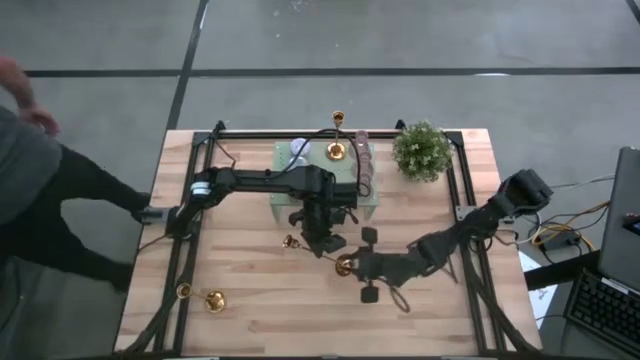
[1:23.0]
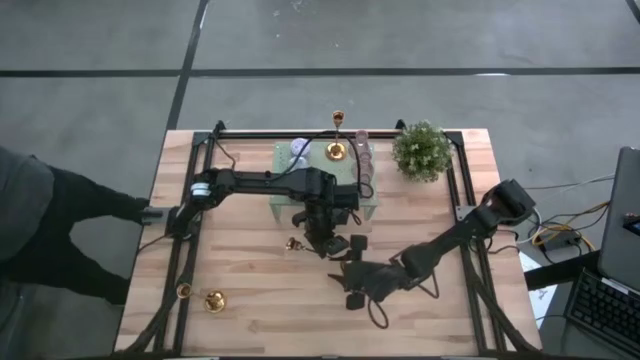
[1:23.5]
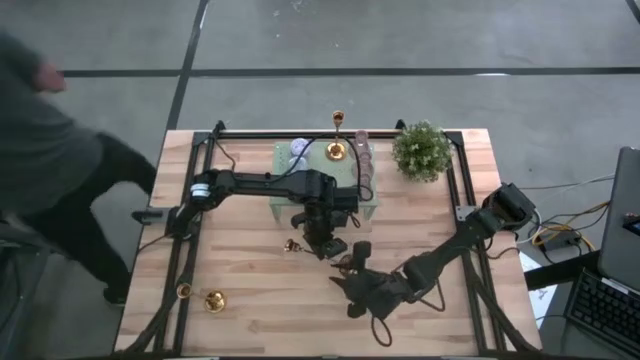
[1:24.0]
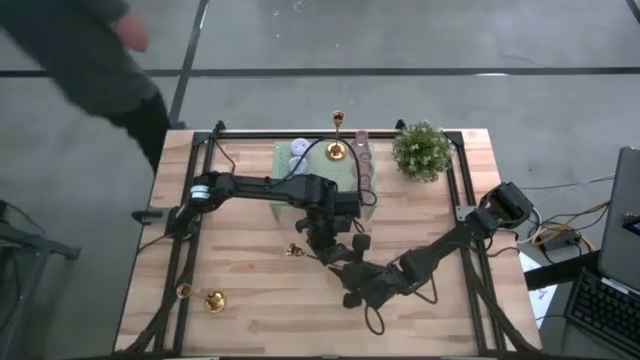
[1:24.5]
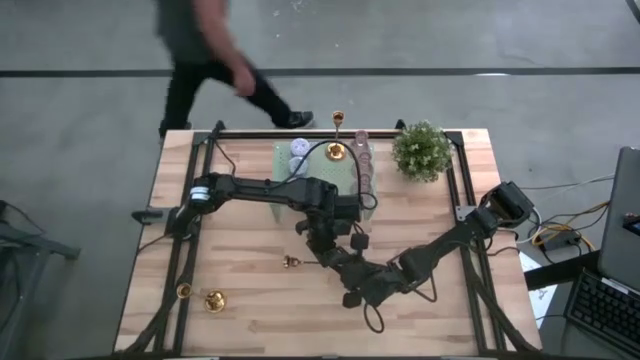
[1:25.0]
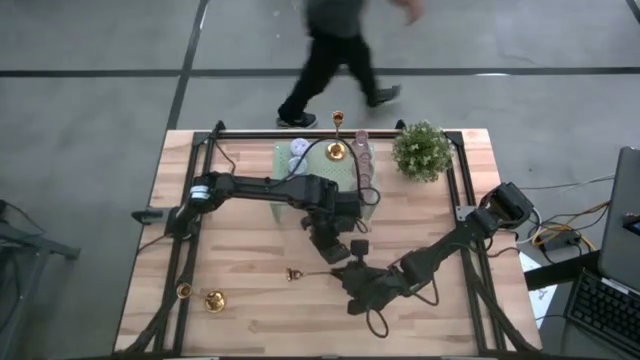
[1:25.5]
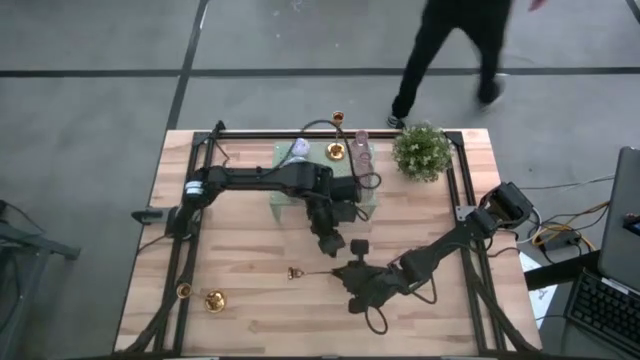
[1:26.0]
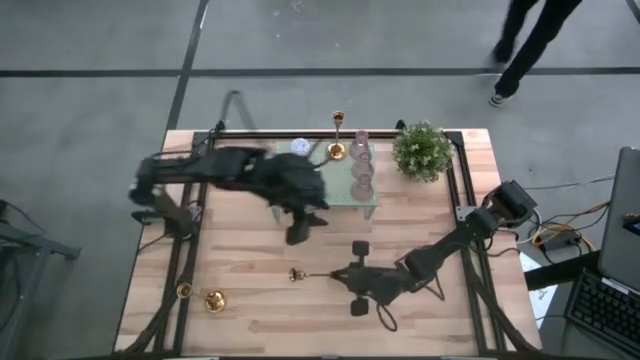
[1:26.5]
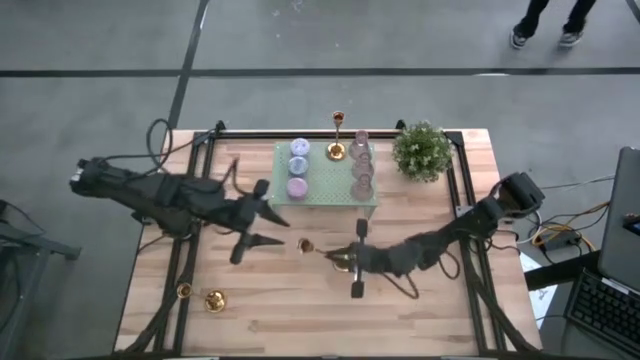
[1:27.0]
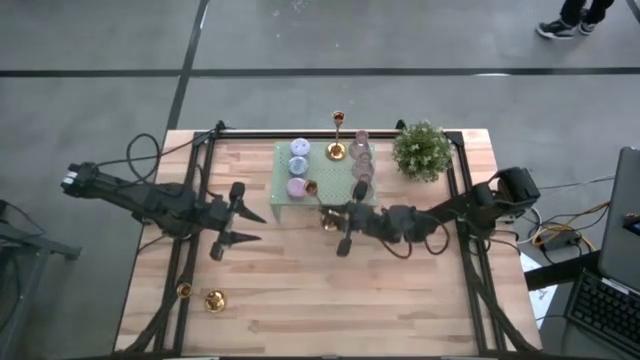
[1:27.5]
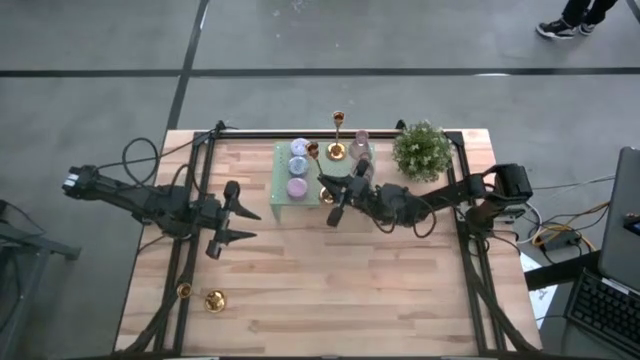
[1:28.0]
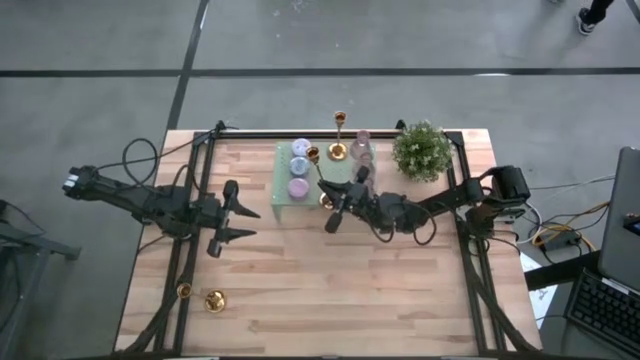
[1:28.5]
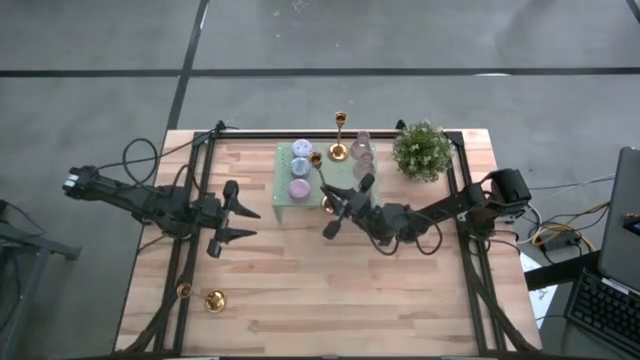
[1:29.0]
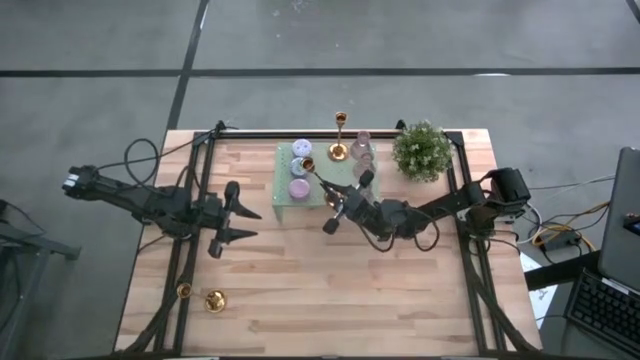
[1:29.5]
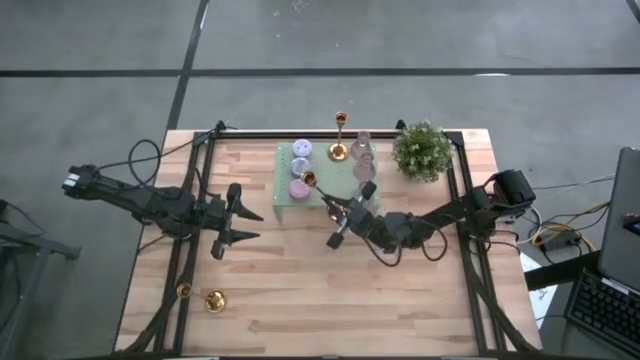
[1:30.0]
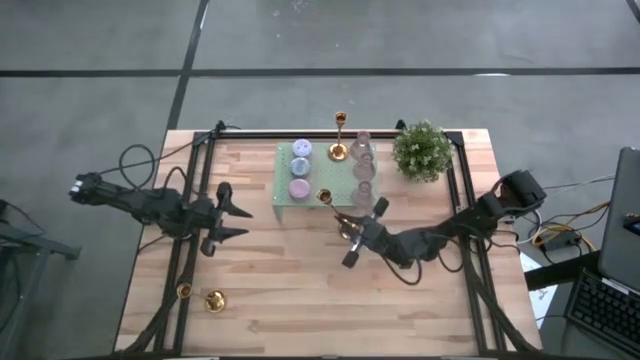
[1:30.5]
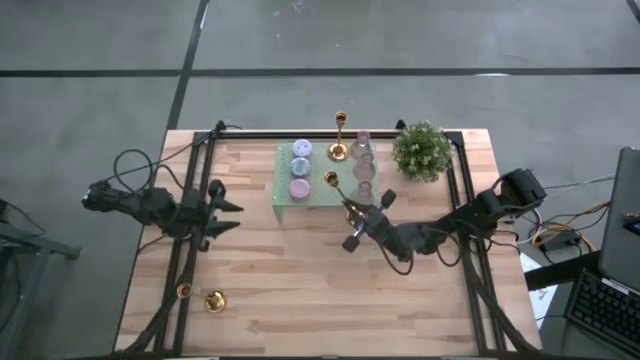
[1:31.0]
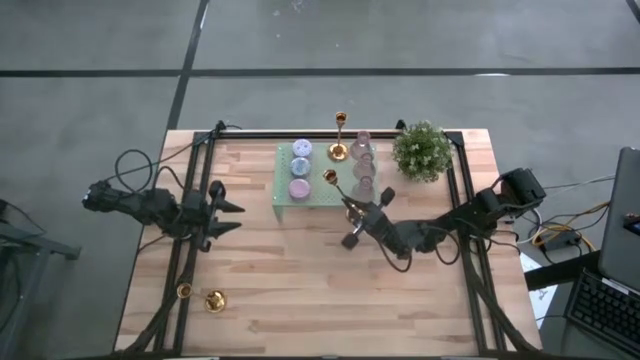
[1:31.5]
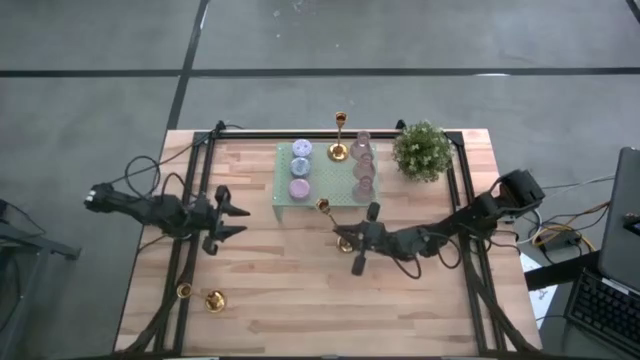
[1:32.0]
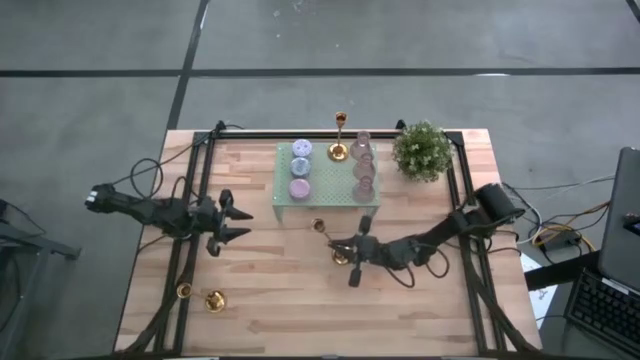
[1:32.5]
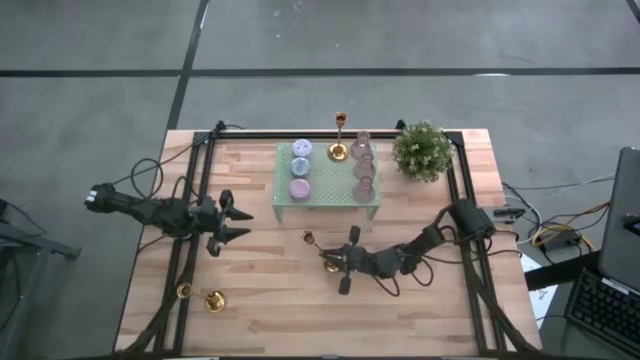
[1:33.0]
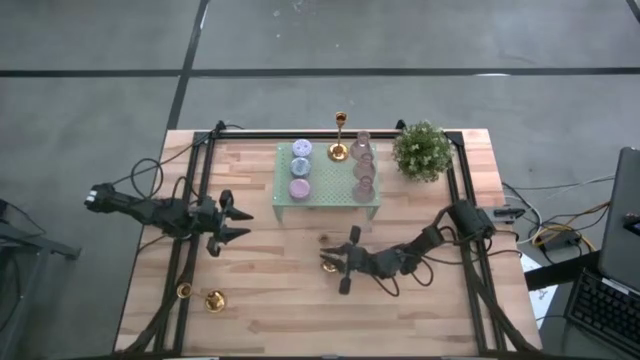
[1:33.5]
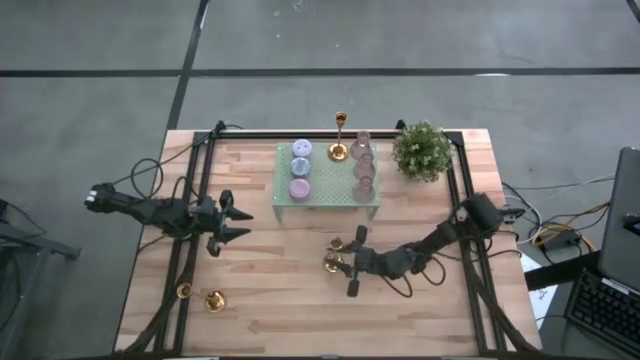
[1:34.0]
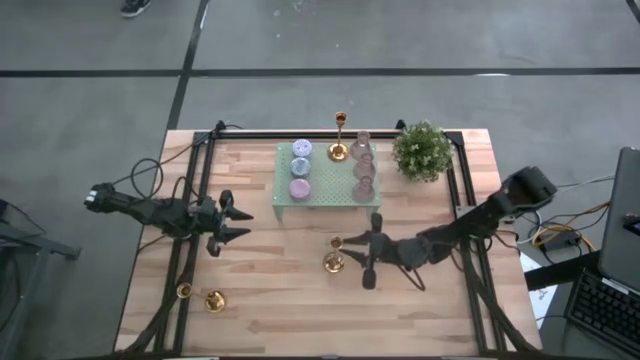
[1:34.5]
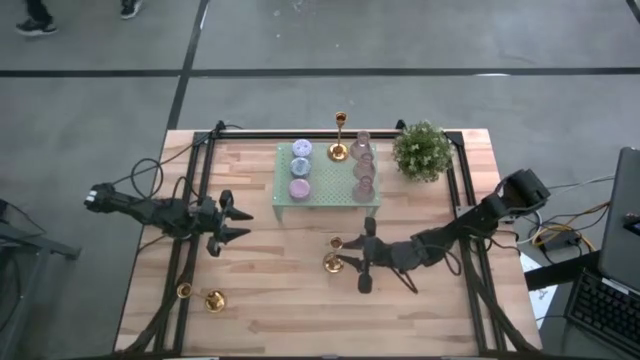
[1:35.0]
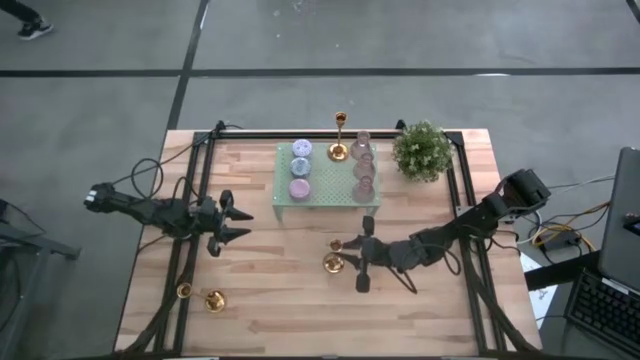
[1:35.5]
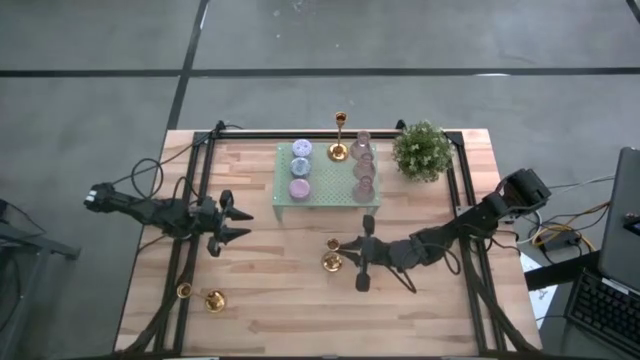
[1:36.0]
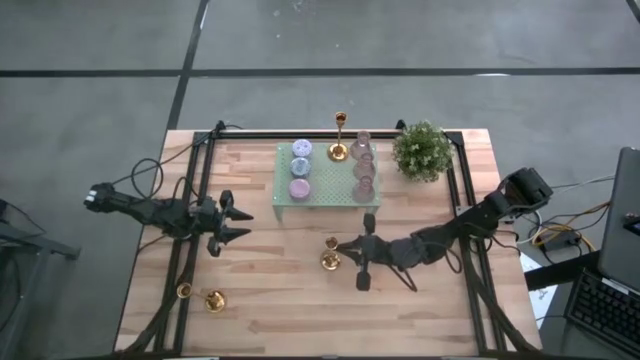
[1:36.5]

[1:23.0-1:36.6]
Task: Pick & Place candle stick holders
Put the top gold candle holder on the shelf aligned with the other gold candle holder

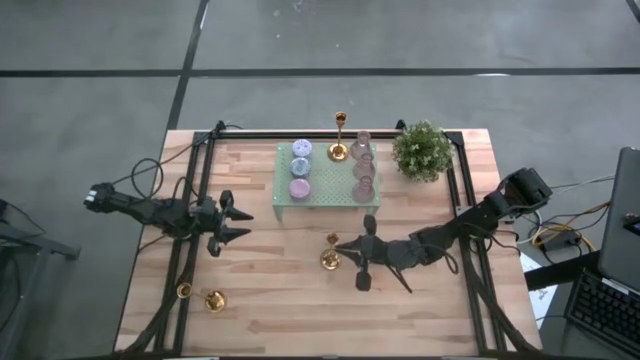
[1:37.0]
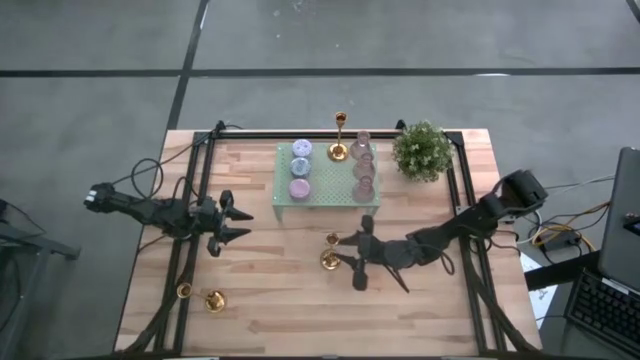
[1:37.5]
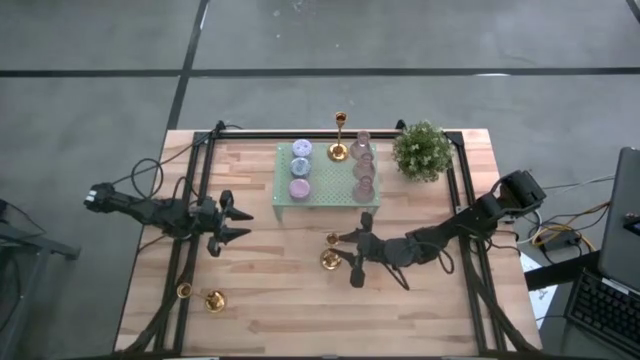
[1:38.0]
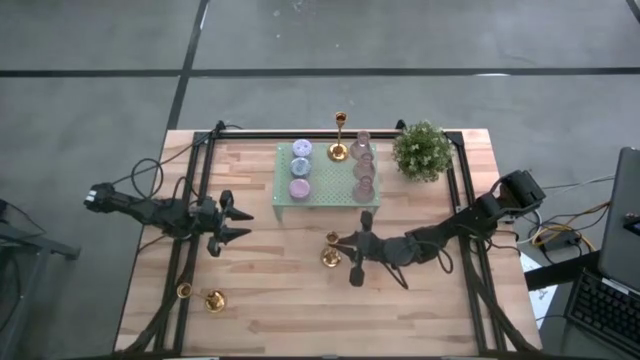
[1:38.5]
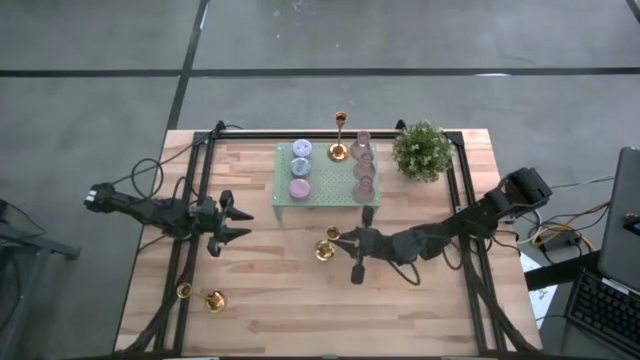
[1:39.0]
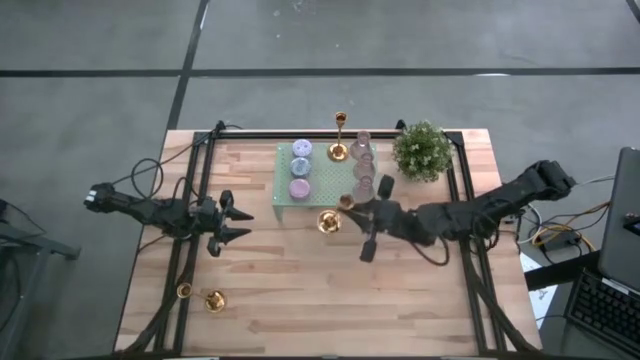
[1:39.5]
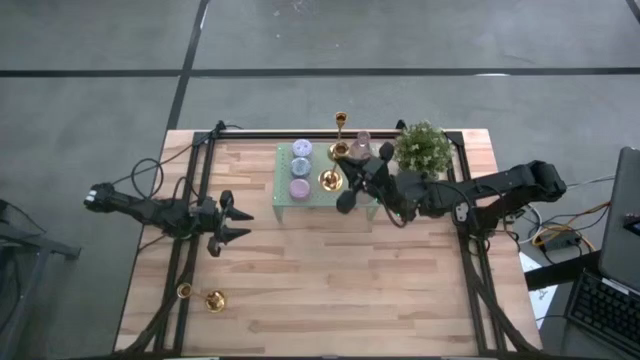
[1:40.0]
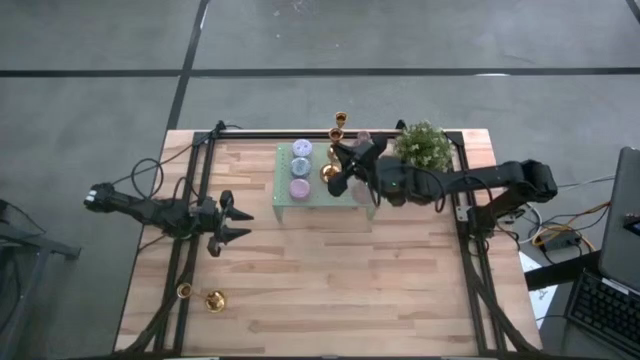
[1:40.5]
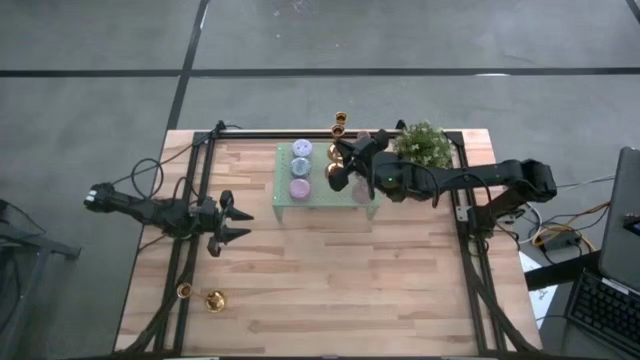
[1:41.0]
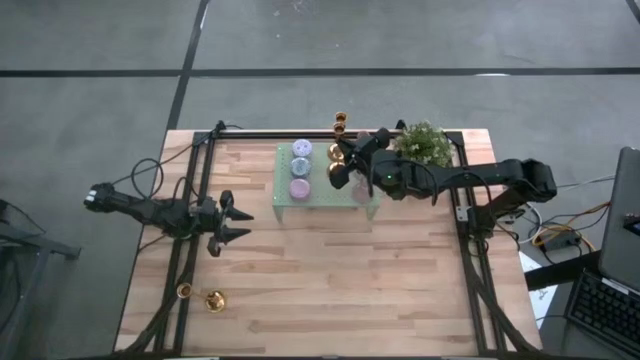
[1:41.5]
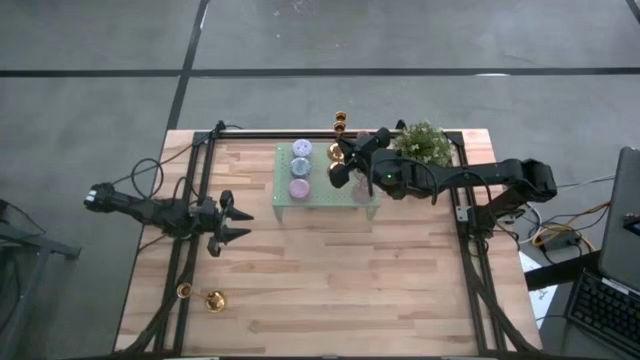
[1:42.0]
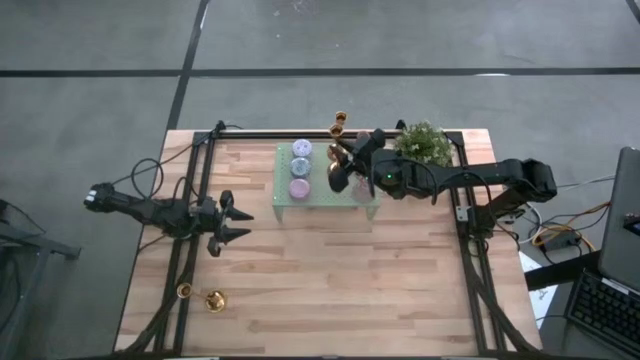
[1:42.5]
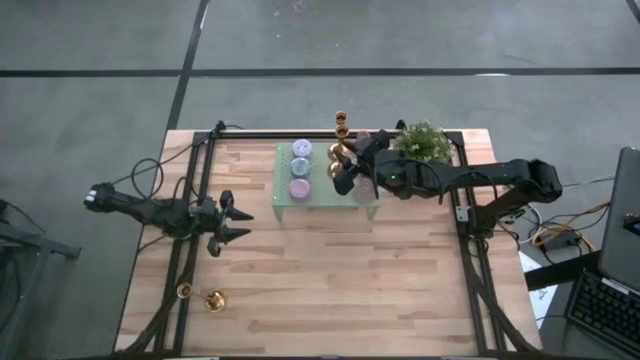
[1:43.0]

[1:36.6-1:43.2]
Put the top gold candle holder on the shelf aligned with the other gold candle holder

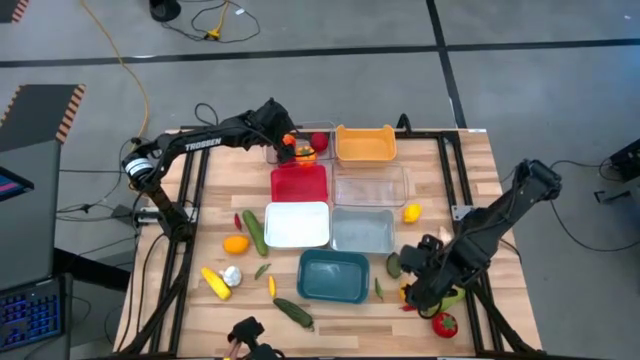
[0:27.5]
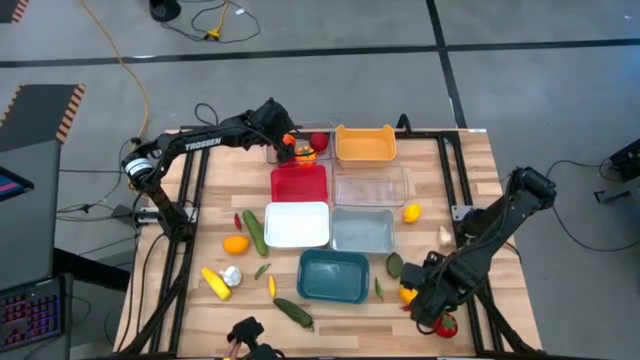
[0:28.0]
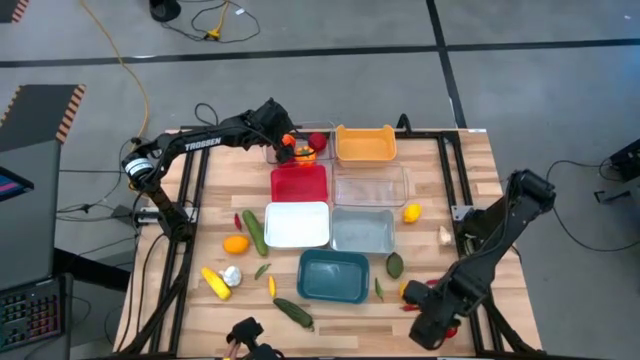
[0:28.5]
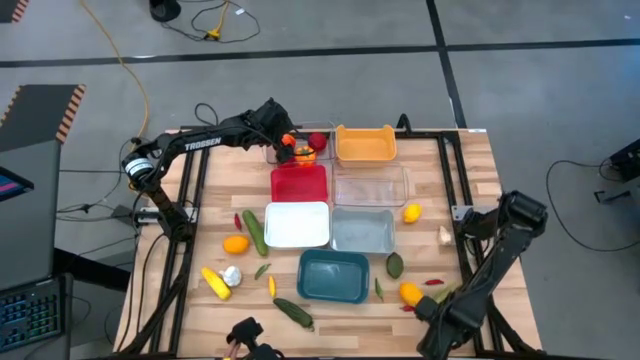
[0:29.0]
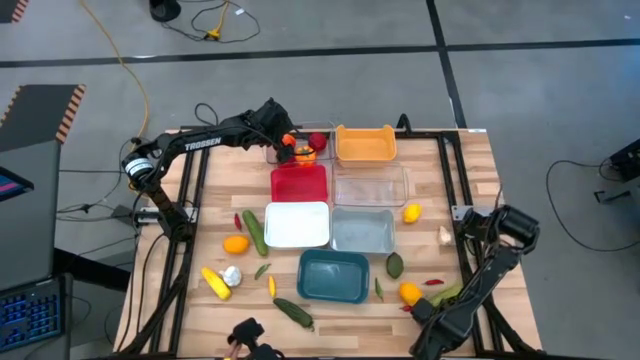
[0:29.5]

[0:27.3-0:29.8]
Task: Sort produce into baskets
Put the red tomato into the top transparent bin
